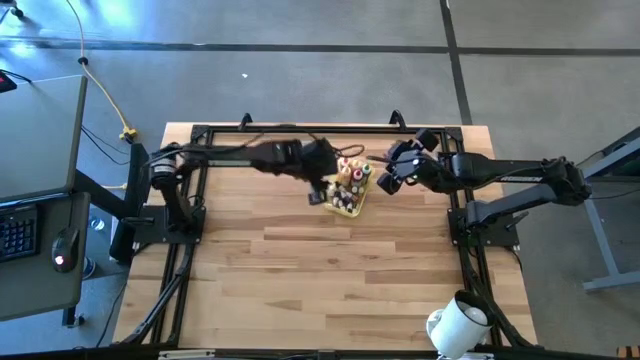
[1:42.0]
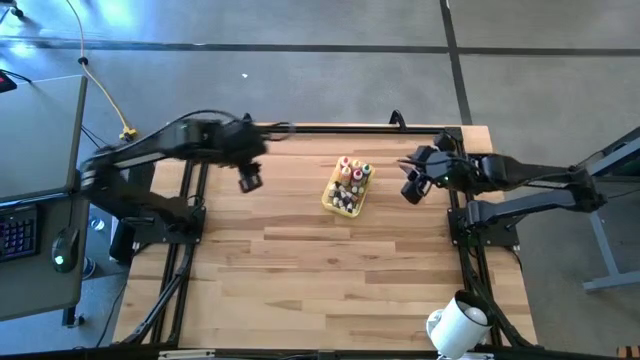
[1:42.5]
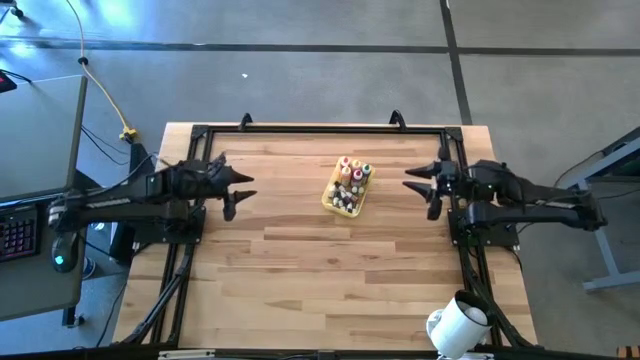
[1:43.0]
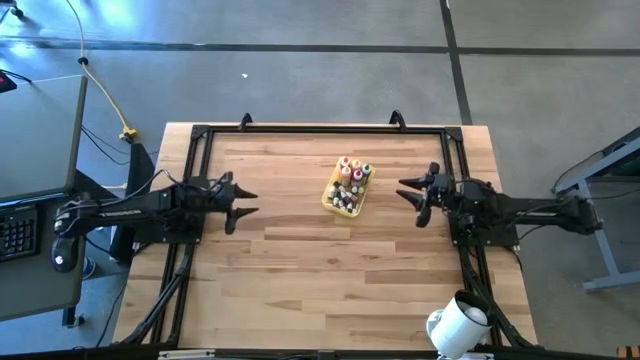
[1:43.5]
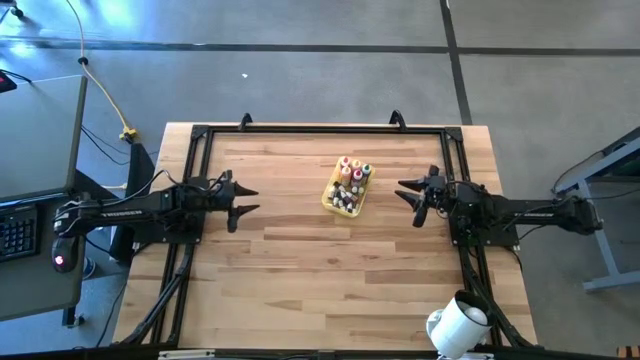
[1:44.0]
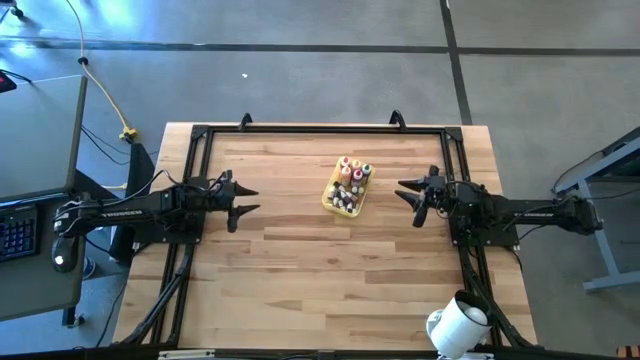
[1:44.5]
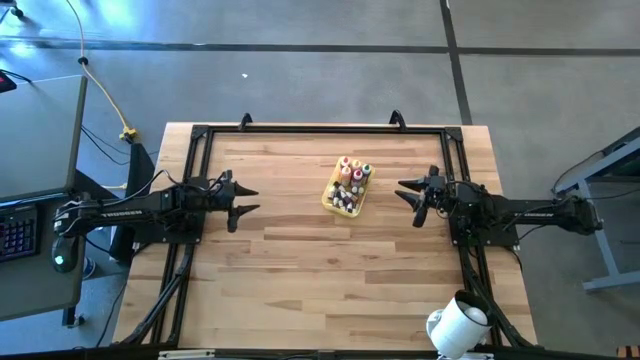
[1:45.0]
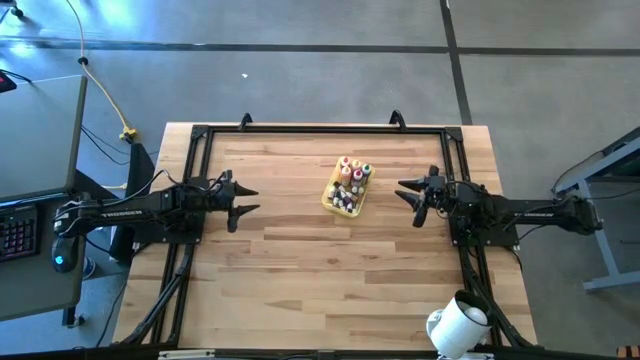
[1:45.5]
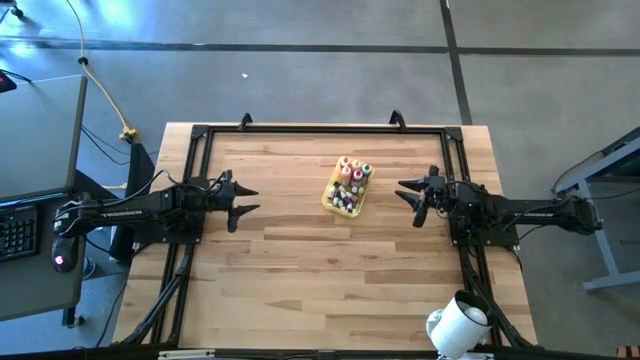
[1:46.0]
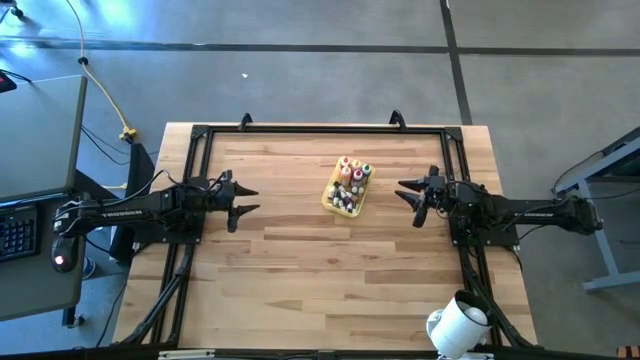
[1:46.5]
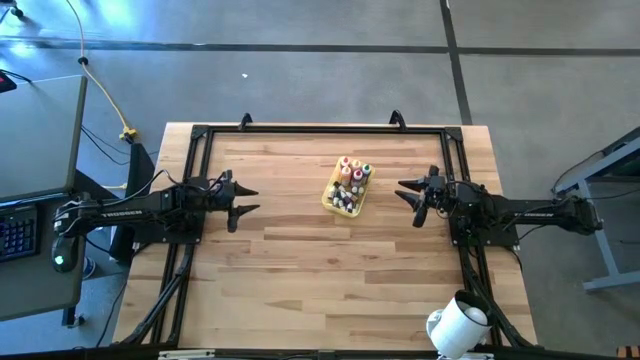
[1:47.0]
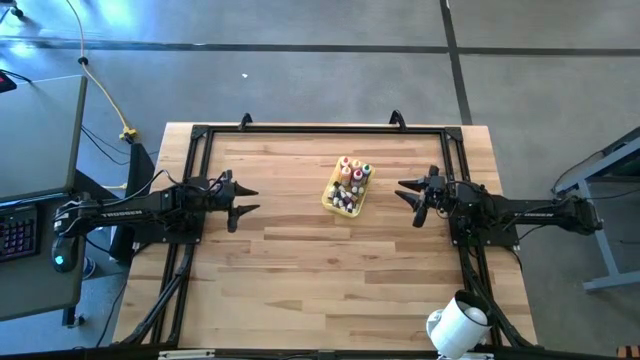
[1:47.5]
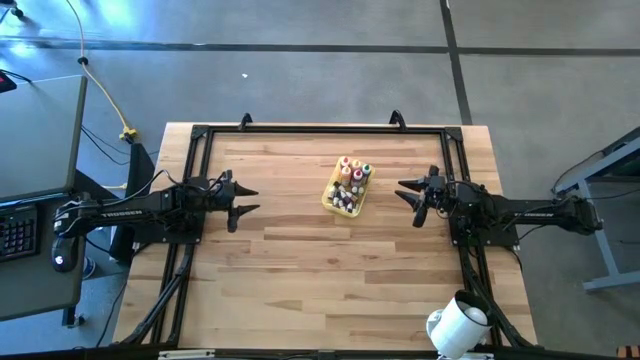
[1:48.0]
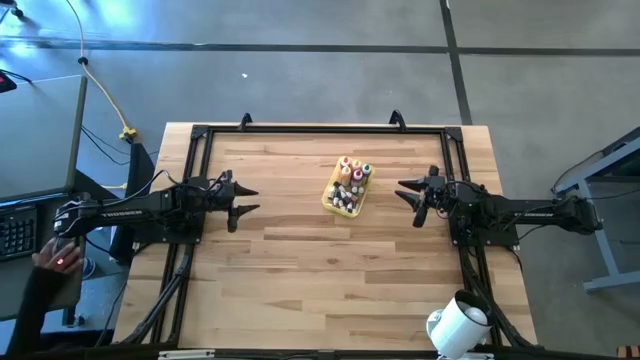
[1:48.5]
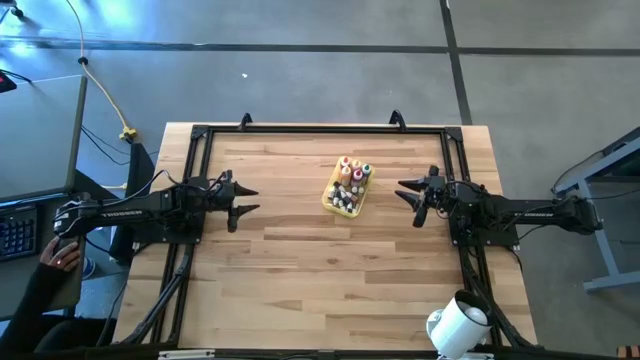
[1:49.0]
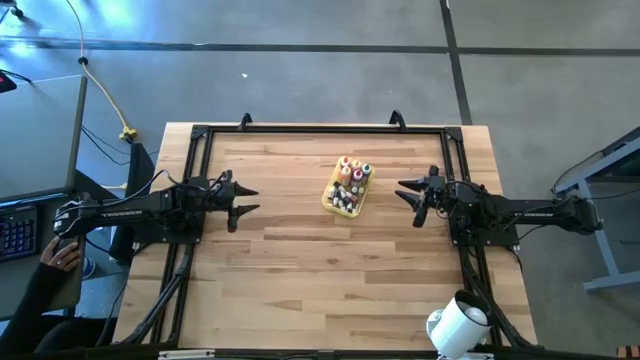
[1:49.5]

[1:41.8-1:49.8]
Task: Pick & Place food coloring
Return to Home Position

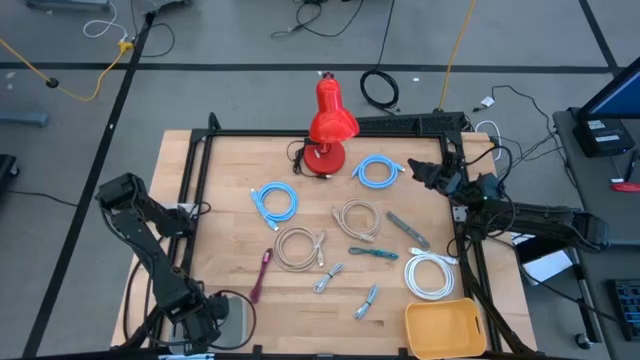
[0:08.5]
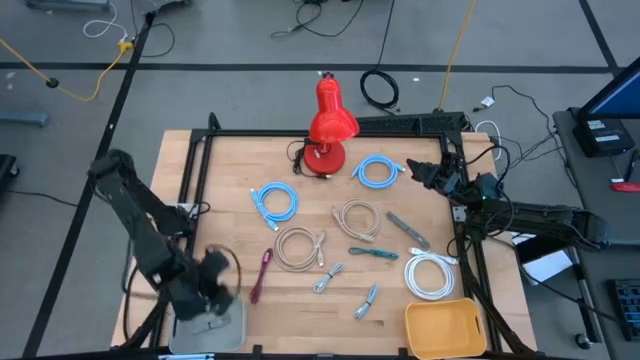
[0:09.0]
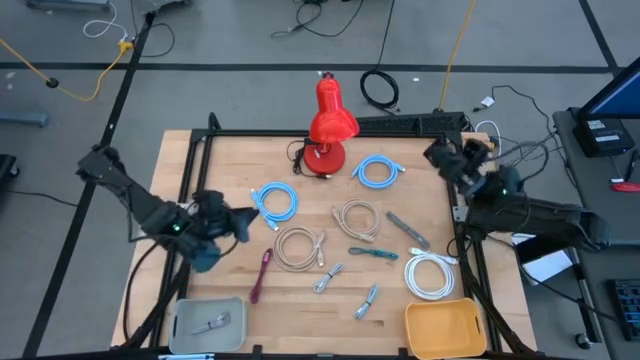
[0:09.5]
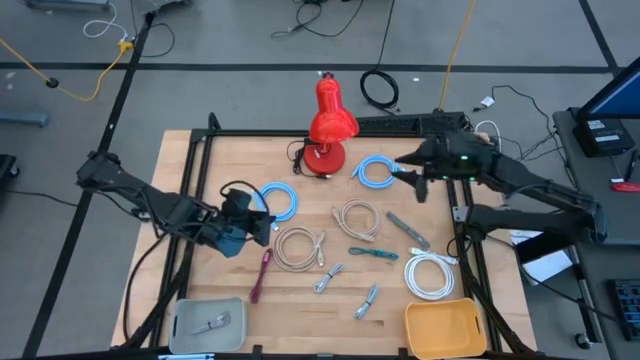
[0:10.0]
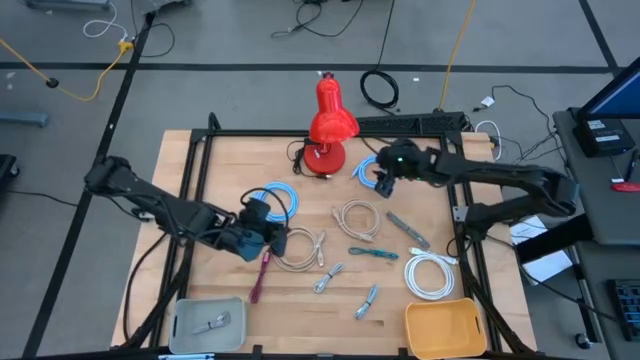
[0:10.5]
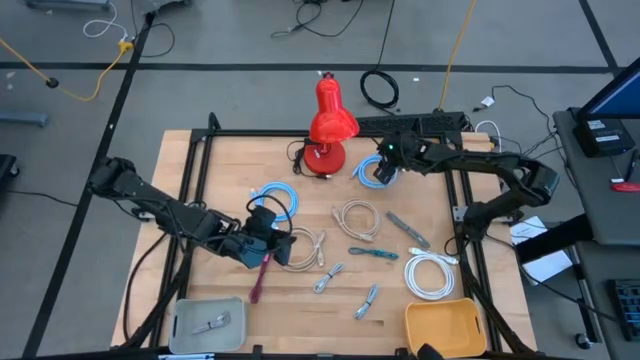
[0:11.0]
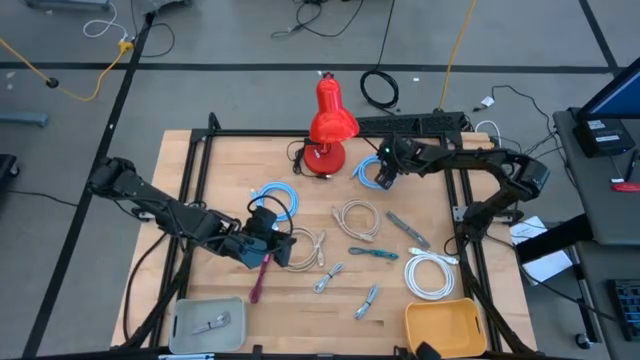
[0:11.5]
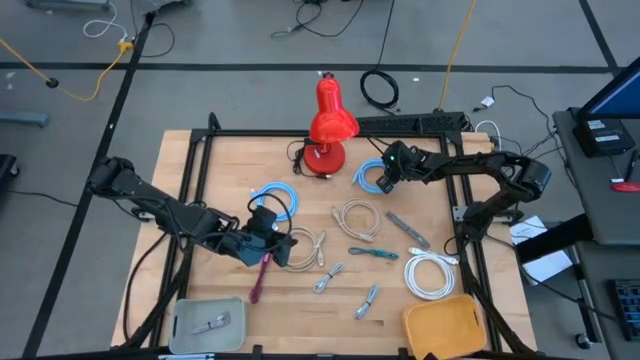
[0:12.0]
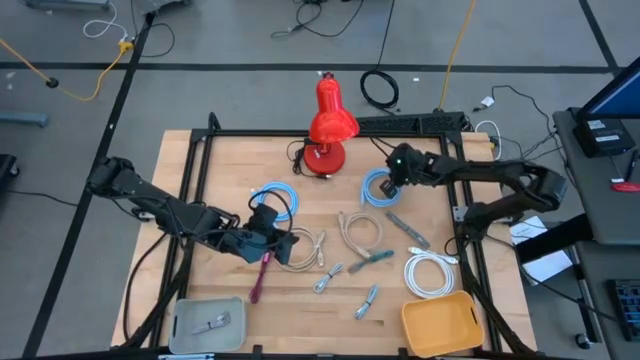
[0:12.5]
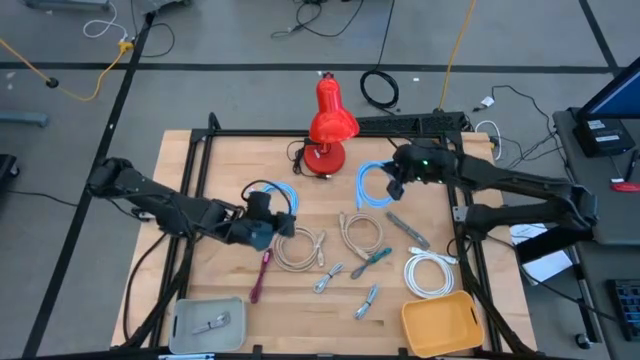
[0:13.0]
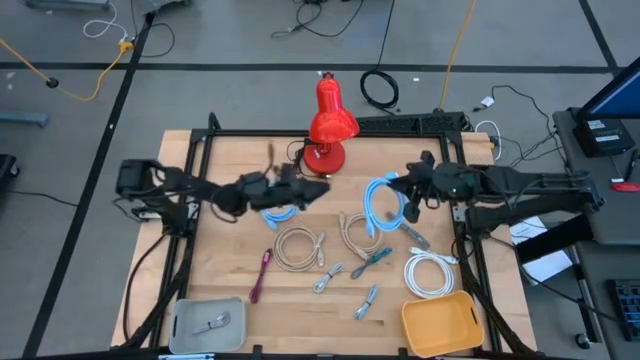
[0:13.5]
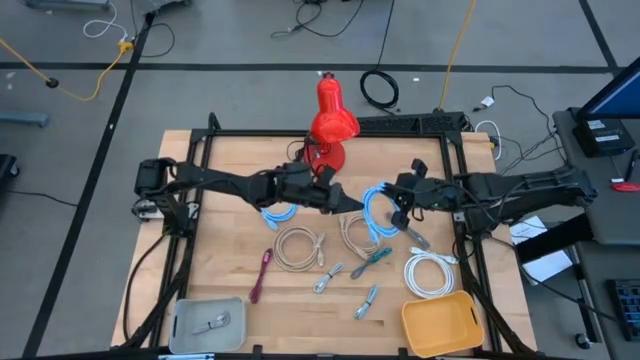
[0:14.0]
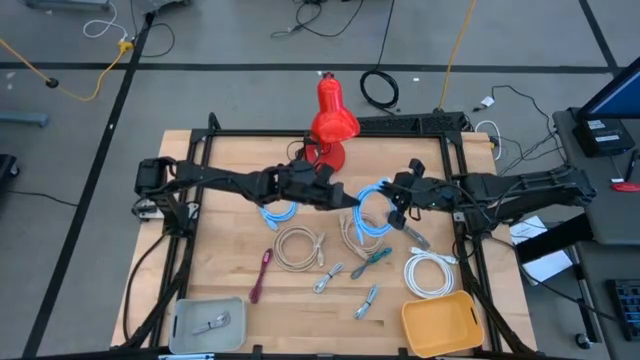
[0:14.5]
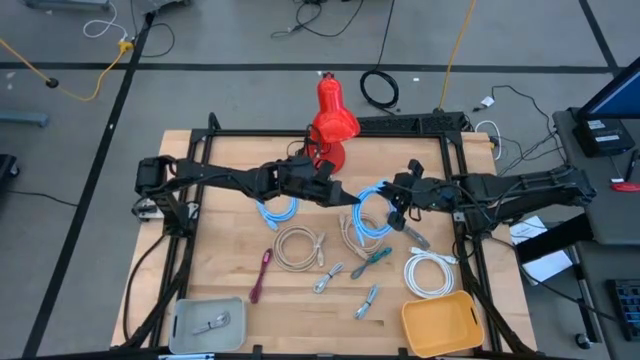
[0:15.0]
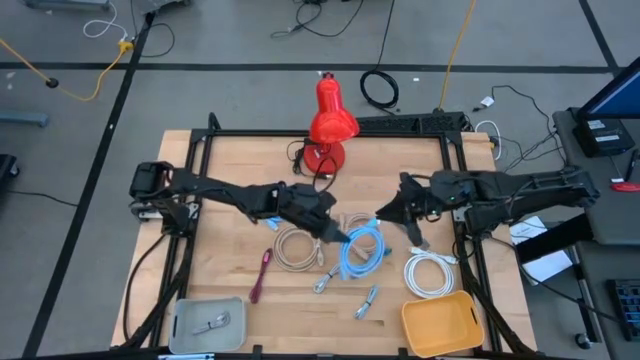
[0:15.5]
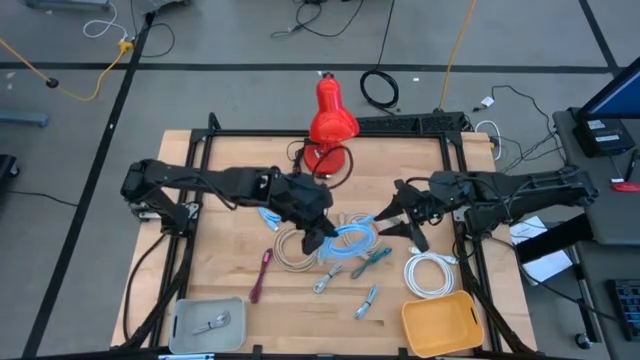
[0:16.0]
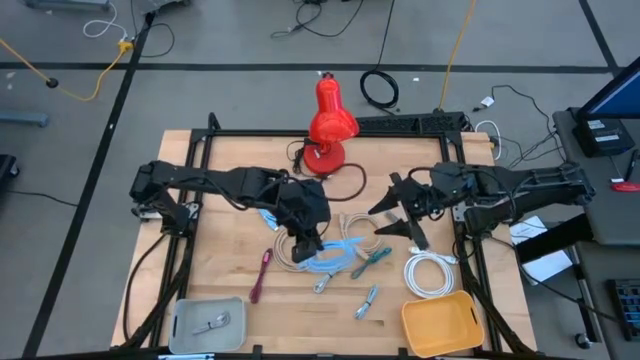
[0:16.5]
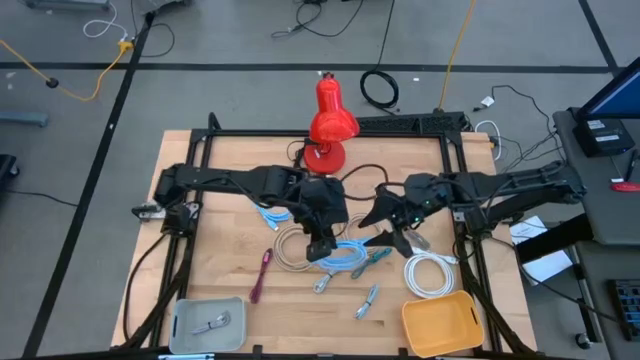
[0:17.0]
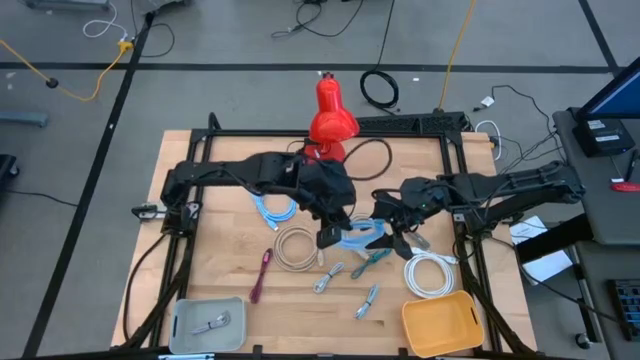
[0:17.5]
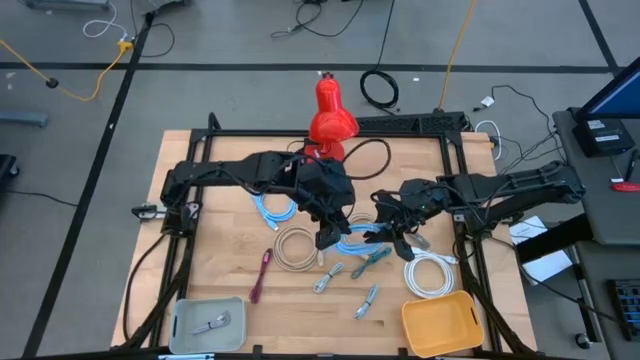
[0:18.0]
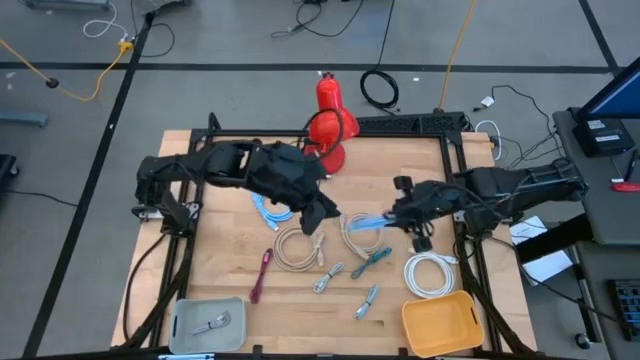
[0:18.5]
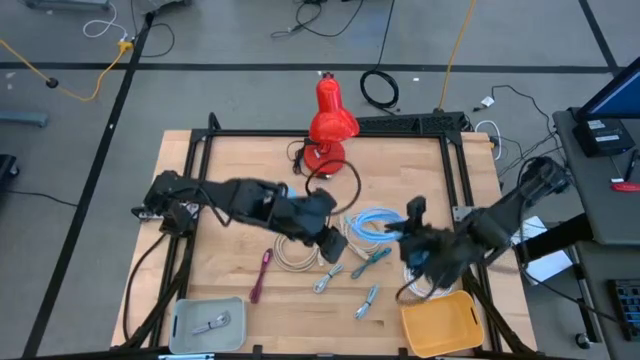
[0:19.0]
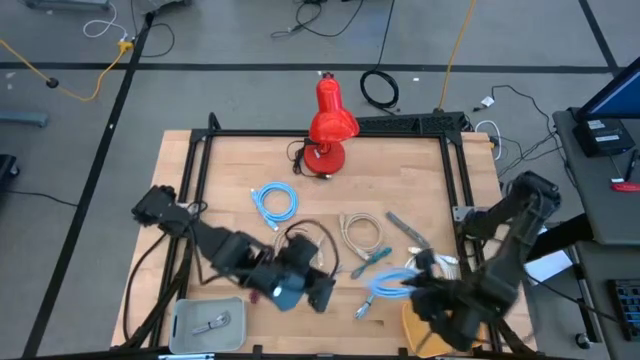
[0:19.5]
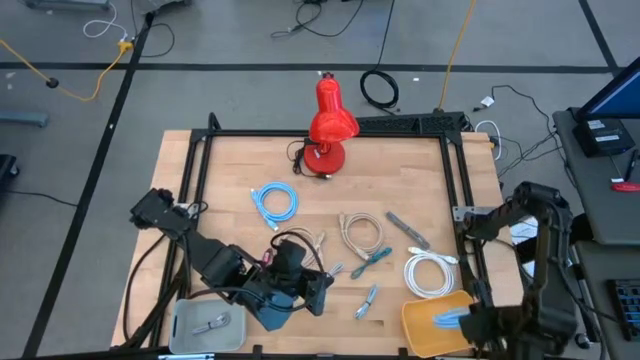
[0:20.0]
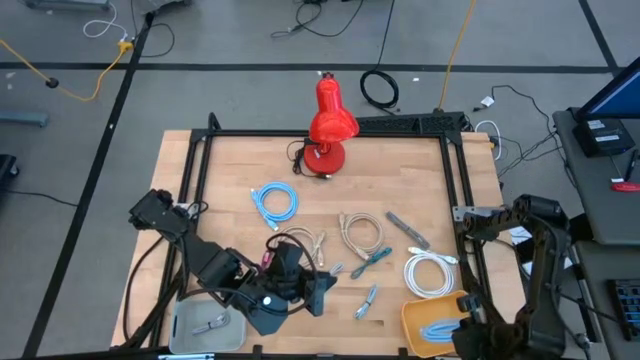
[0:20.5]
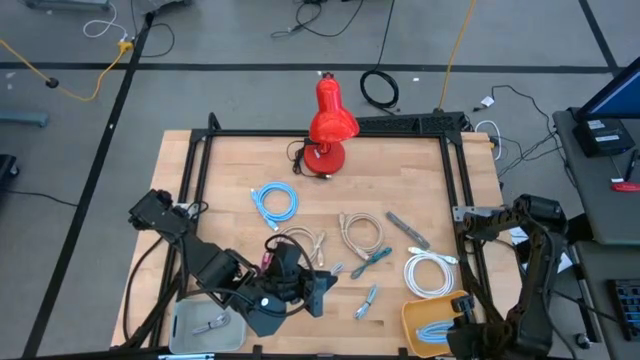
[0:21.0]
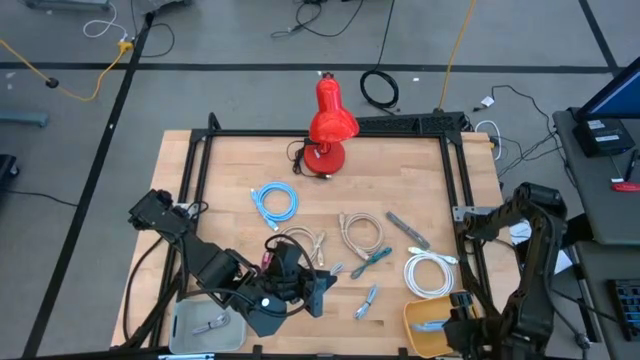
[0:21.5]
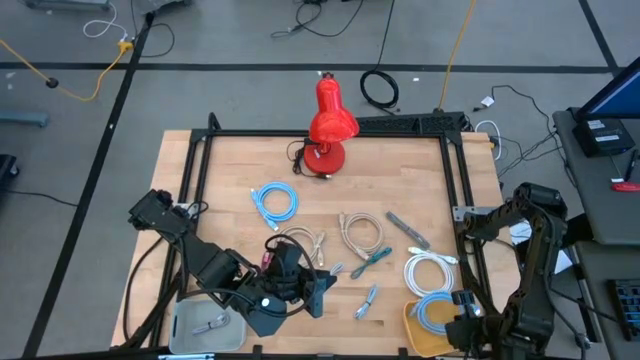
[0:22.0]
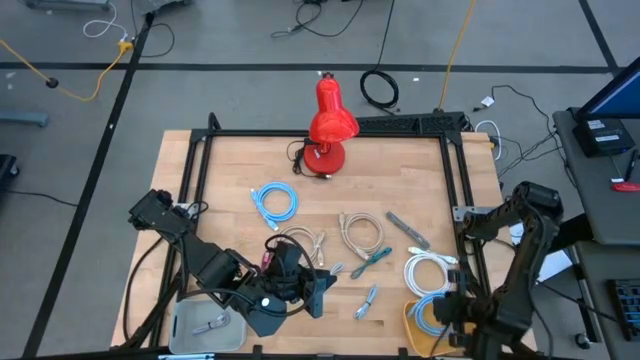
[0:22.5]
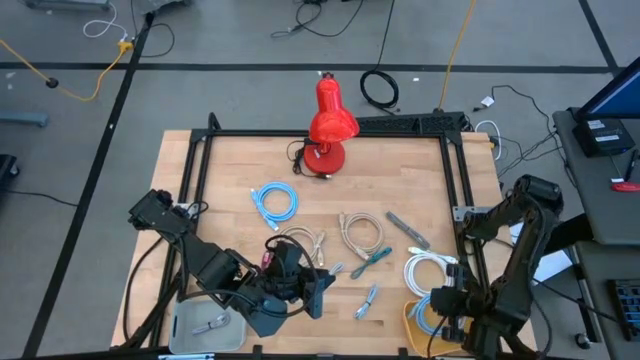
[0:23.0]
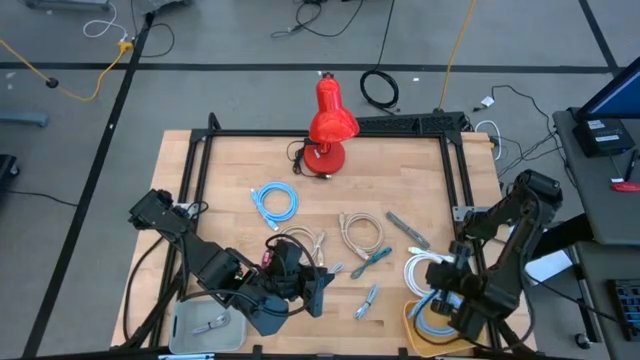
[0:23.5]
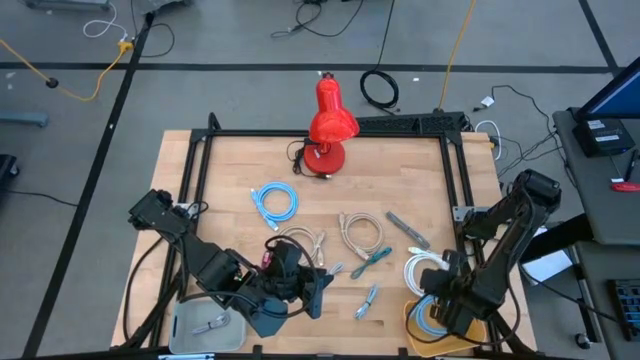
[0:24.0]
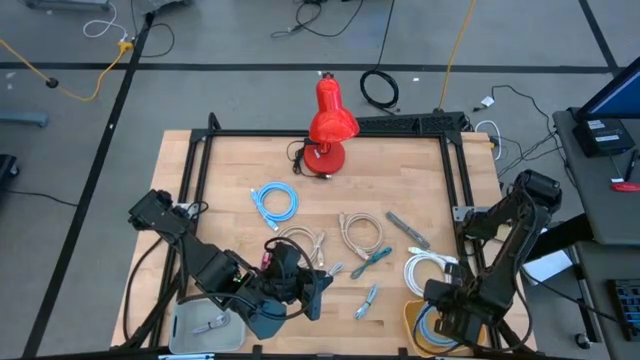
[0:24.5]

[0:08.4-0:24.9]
Task: Pick & Place USB Port
Put the top blue HDMI cable into the yellow bin
